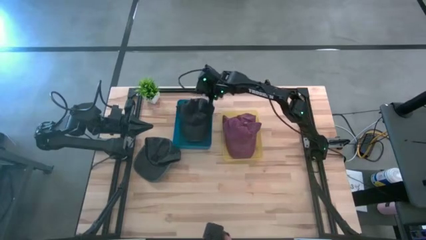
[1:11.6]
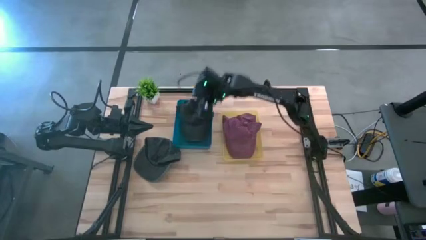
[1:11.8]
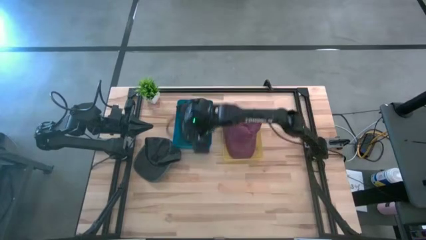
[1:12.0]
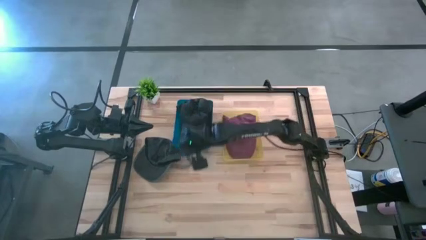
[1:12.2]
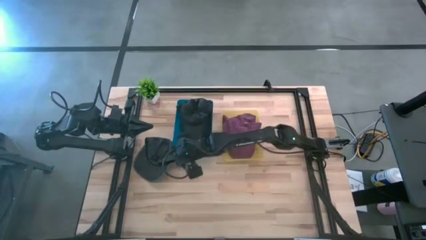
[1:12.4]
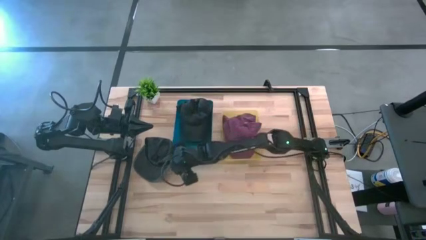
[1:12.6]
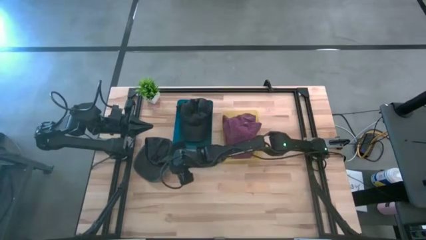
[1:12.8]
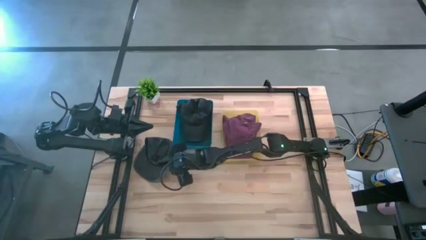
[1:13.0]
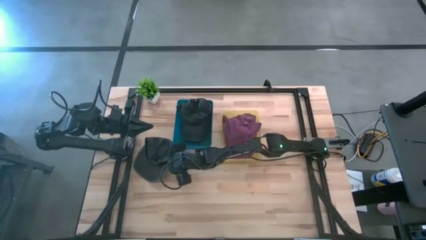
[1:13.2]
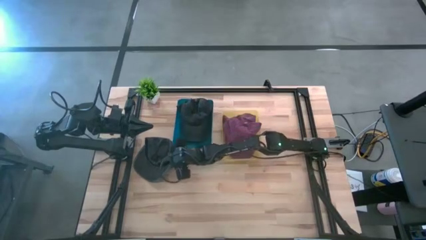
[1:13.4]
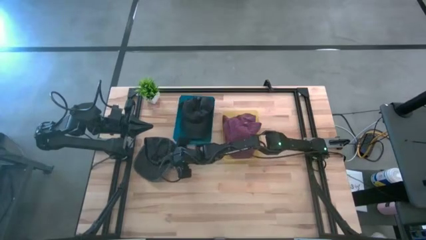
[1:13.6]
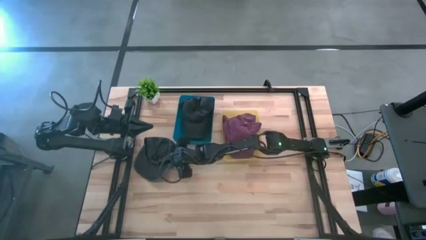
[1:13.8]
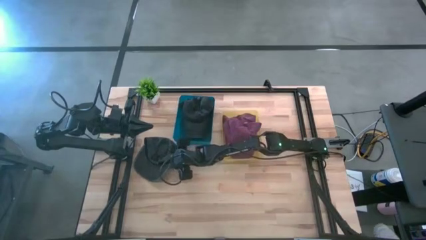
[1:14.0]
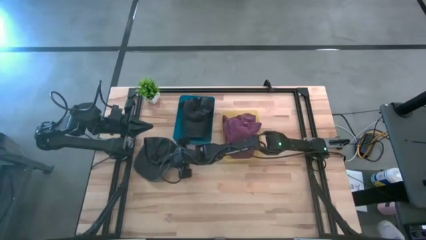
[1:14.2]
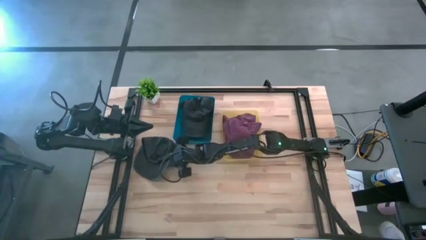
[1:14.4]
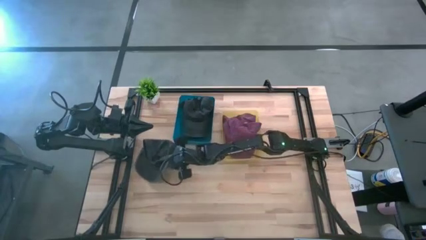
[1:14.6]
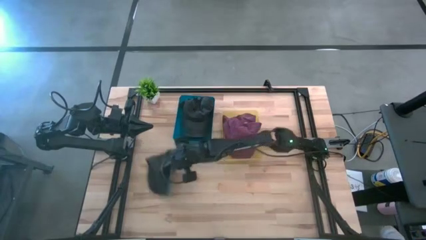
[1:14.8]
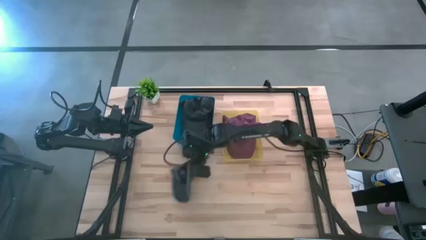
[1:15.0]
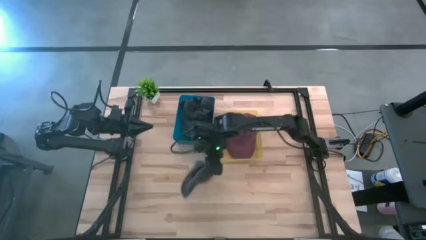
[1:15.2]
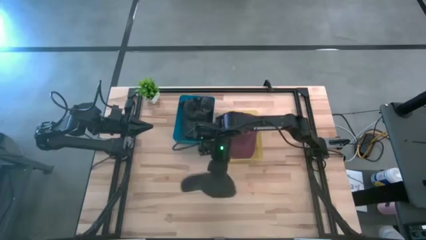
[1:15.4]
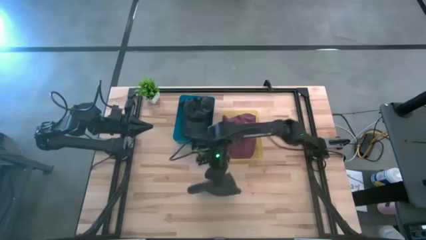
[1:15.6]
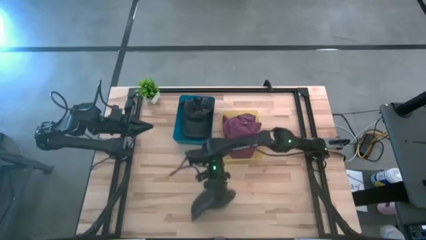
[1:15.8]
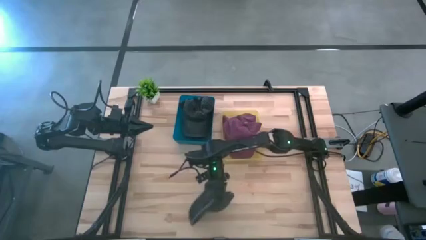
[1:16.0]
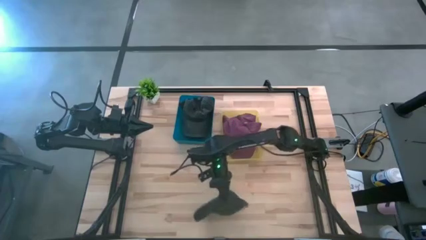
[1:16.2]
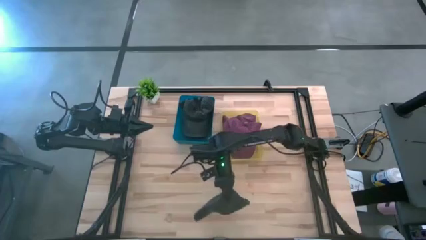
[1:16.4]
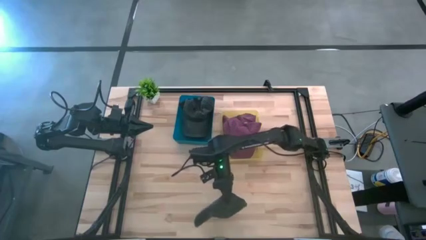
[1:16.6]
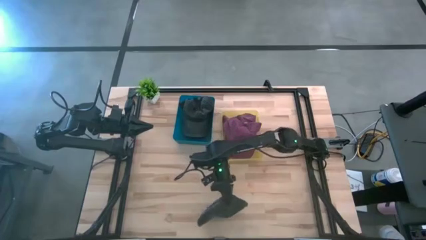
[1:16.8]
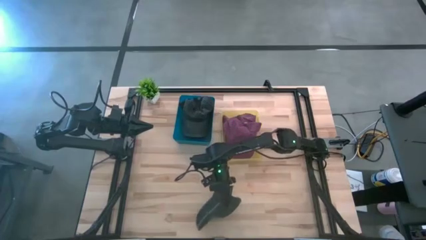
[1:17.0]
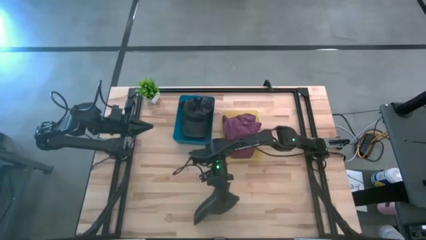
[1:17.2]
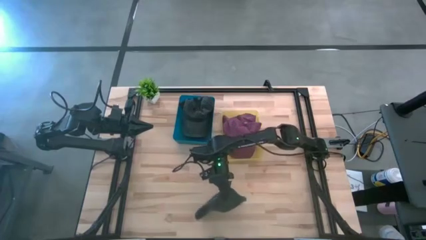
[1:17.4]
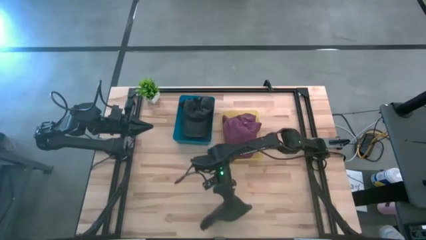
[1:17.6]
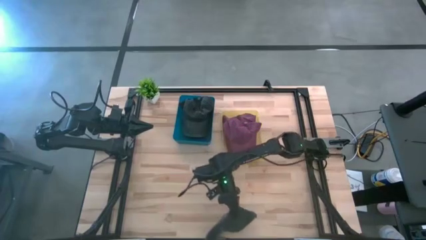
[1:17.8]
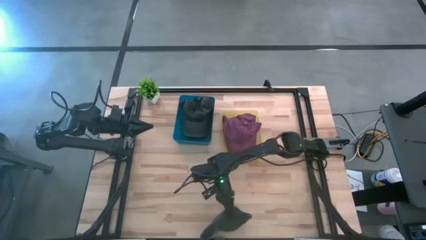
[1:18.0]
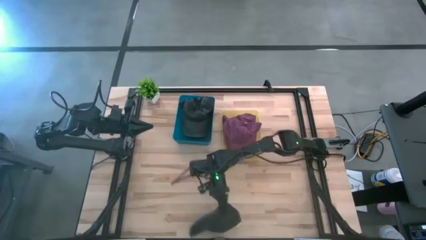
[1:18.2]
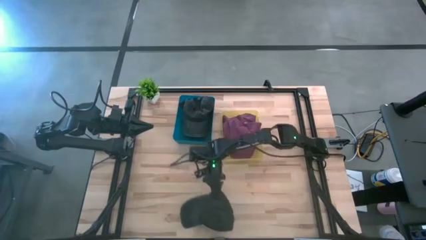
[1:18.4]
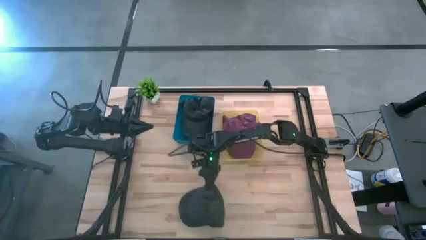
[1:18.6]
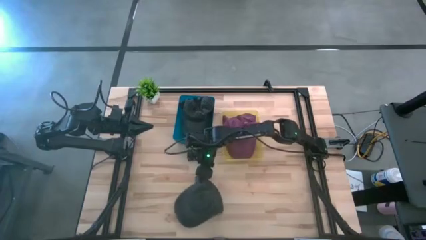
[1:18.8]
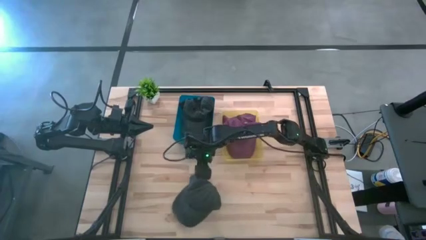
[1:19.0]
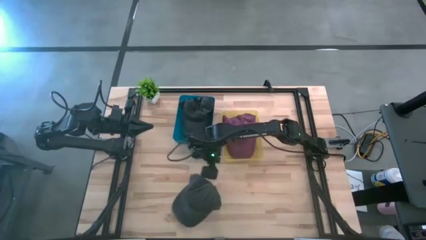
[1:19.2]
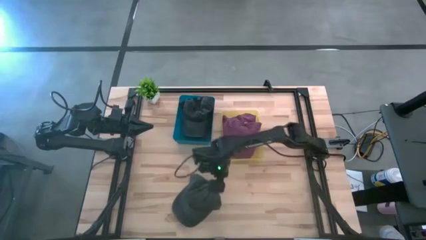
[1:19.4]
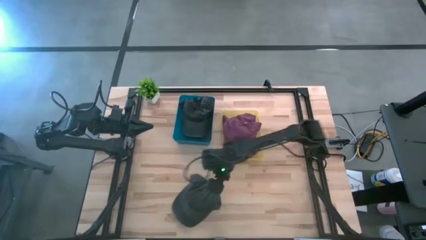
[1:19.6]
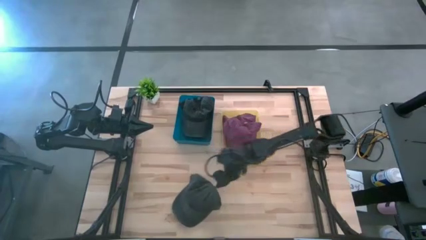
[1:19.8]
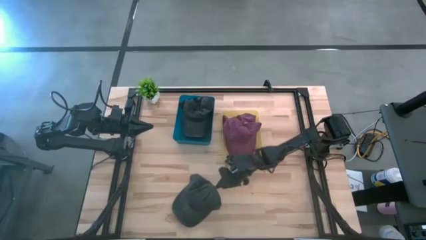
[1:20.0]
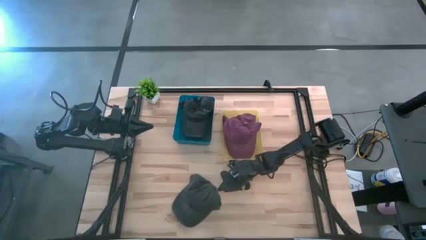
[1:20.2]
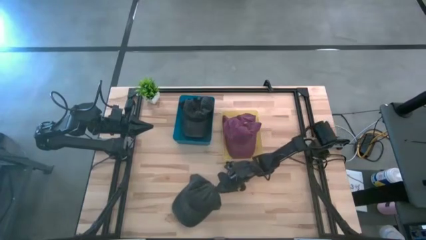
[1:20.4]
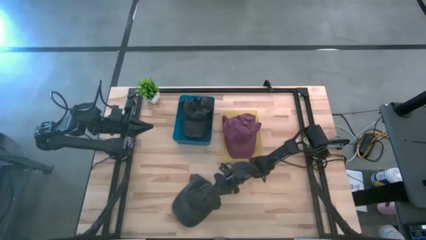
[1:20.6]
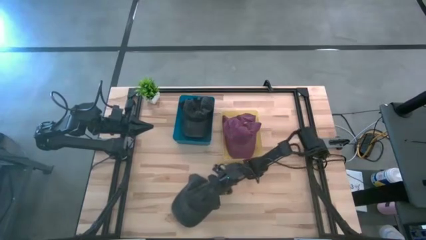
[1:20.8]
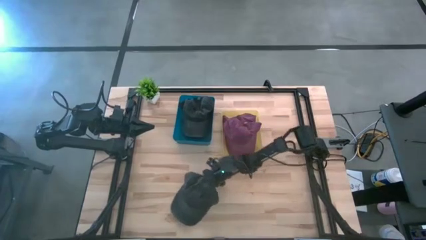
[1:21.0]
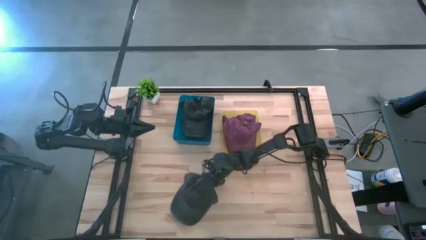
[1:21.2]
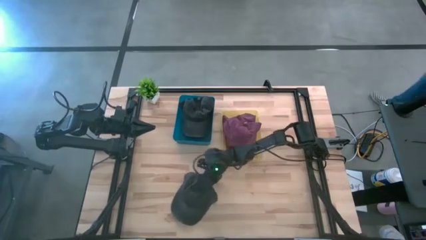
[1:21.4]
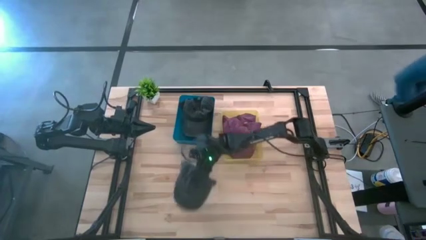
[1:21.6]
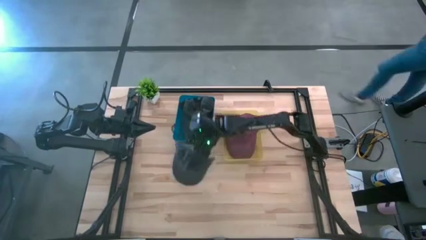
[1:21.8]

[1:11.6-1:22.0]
Task: Pick & Place hat
Put the black cap into the blue bin
